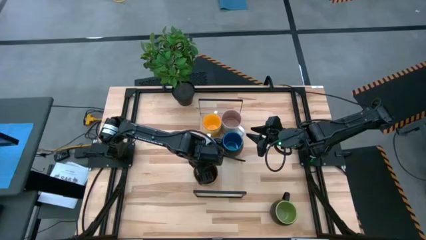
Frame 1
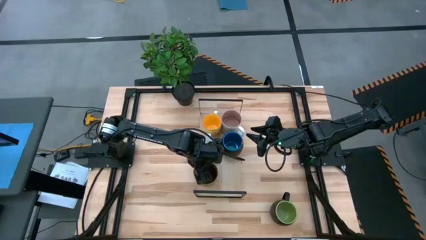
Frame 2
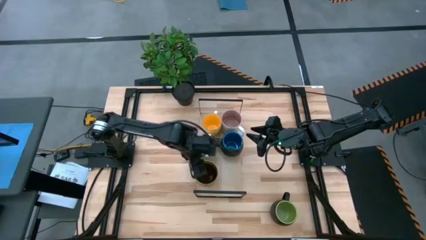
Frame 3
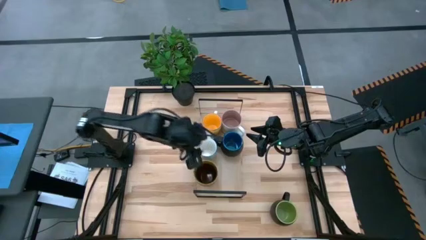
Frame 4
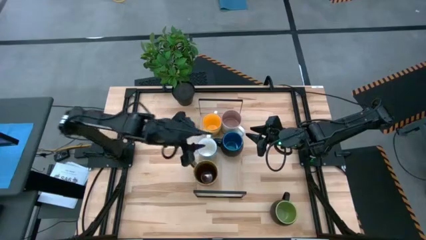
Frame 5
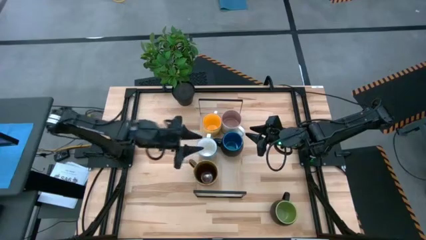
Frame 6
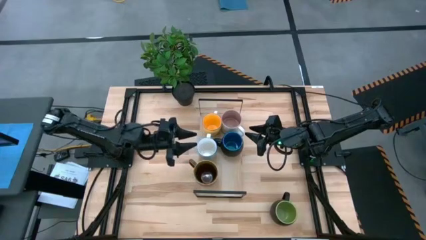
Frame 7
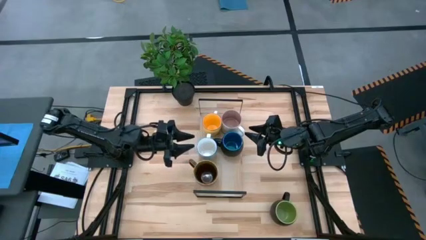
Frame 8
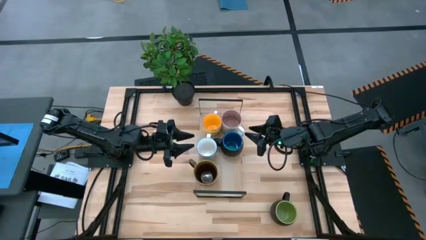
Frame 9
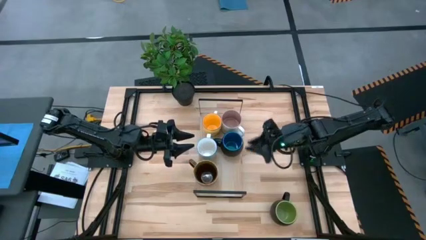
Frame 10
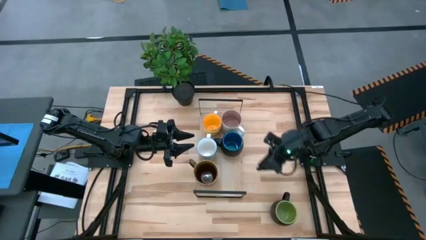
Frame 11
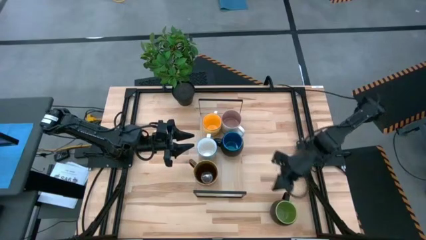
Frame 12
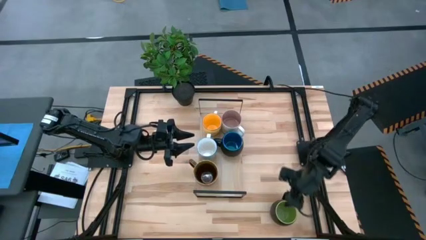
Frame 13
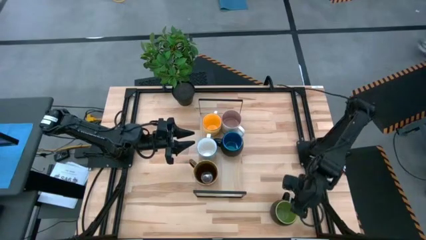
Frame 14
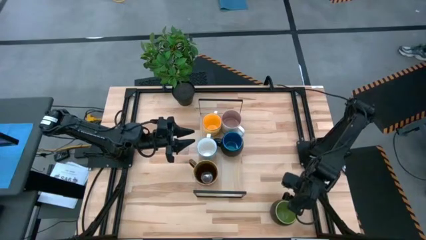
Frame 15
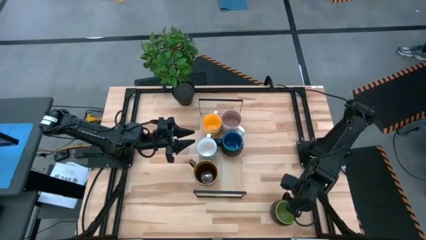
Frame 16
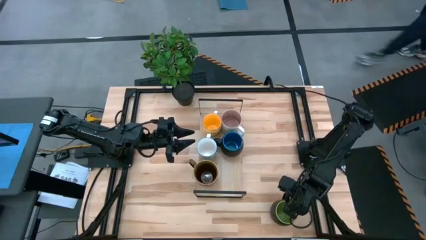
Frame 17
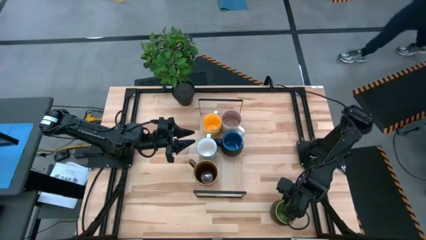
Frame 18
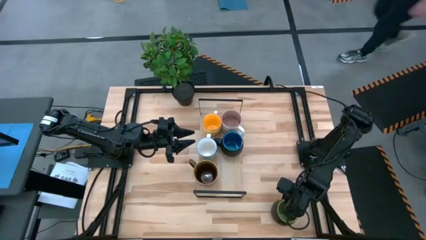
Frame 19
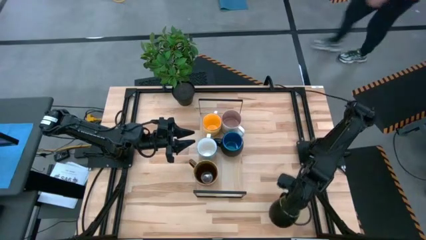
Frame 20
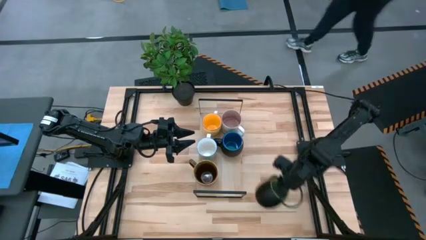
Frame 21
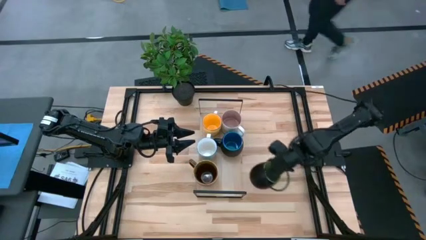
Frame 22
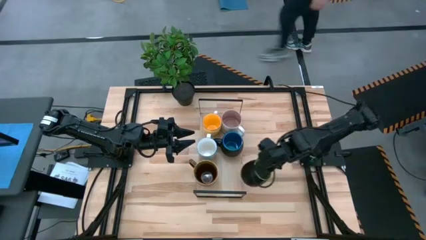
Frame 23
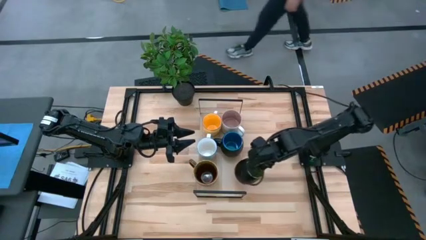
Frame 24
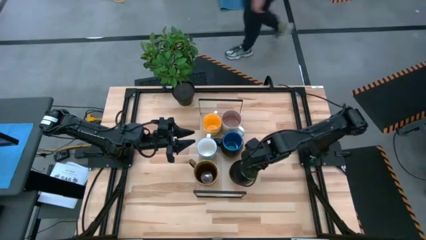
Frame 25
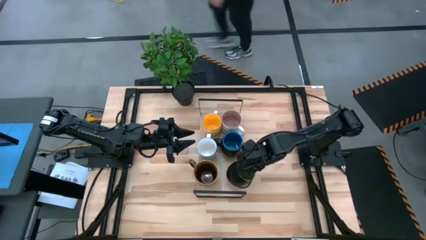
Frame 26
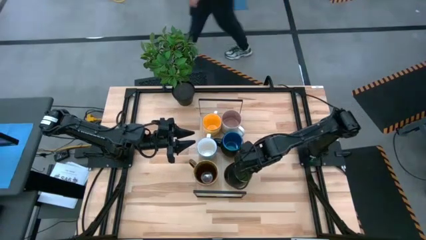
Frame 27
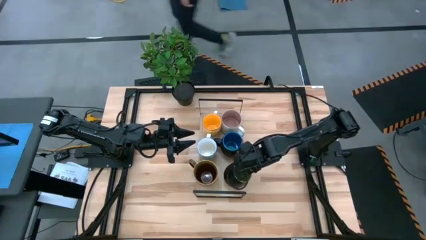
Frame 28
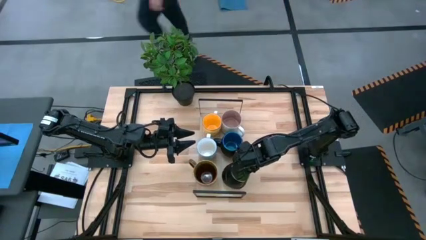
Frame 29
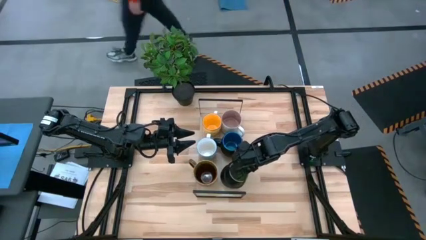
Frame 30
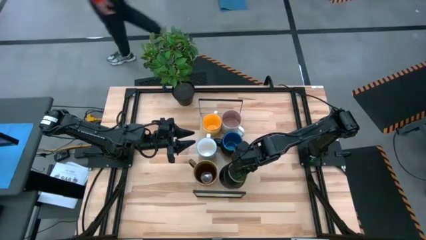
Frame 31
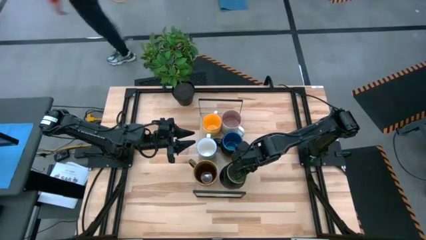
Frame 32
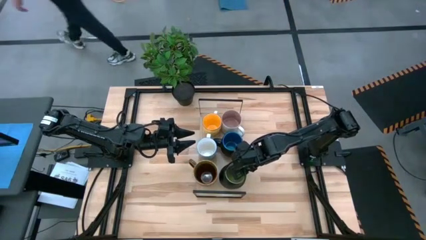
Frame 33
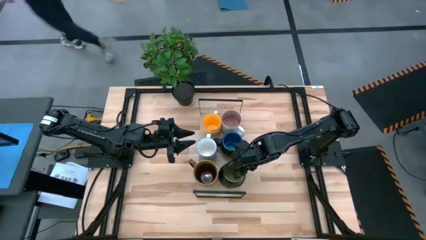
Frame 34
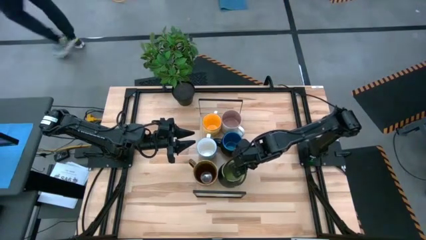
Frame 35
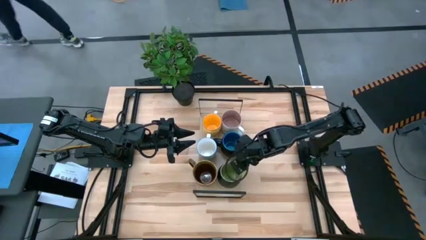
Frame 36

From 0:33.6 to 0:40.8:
Task: Place coffee mugs
Put the black green mug on the shelf

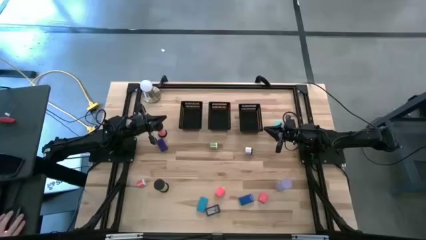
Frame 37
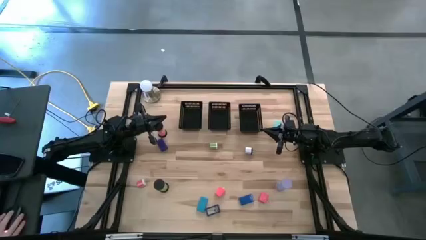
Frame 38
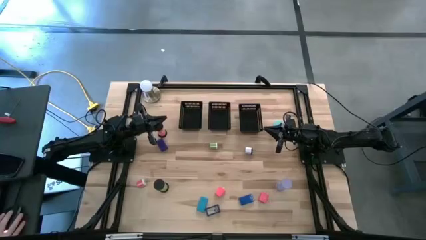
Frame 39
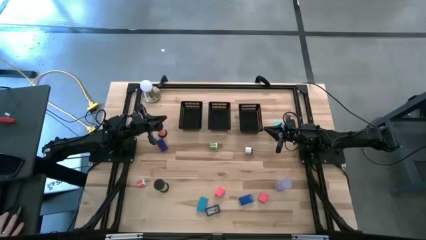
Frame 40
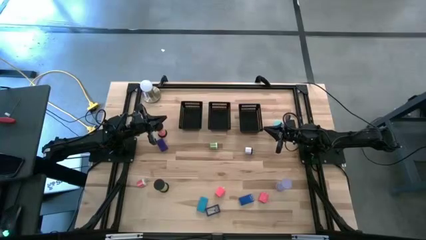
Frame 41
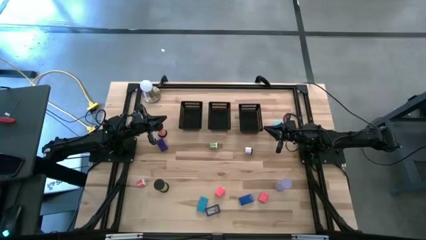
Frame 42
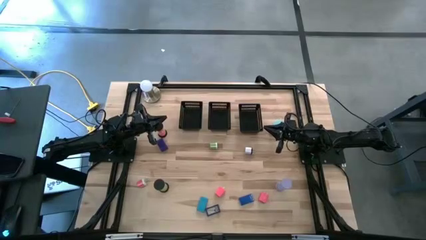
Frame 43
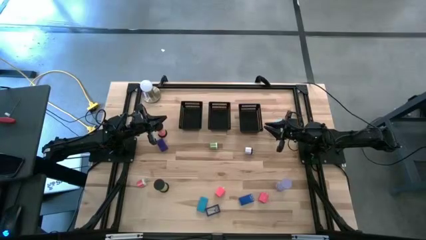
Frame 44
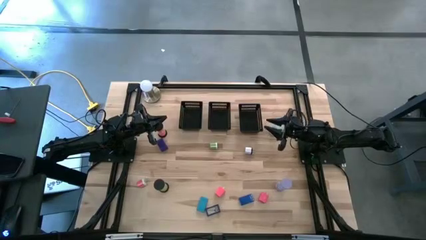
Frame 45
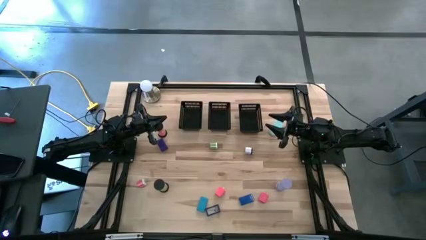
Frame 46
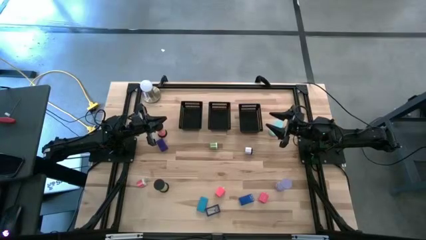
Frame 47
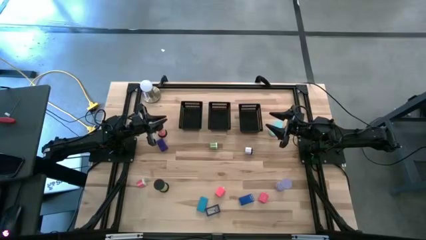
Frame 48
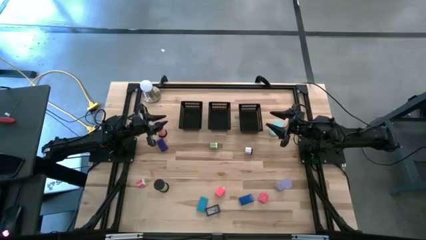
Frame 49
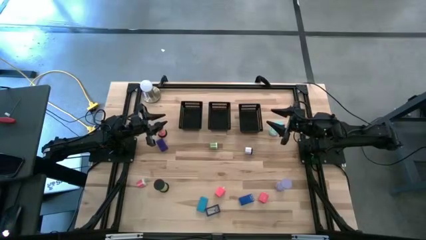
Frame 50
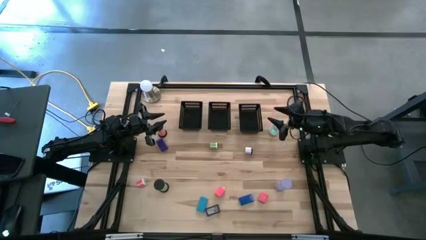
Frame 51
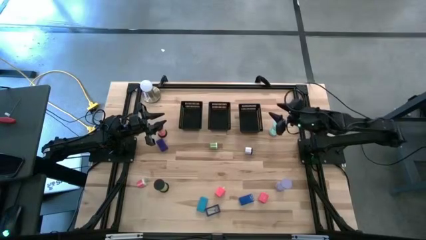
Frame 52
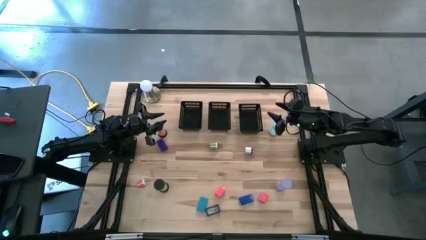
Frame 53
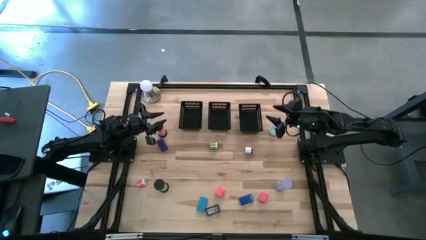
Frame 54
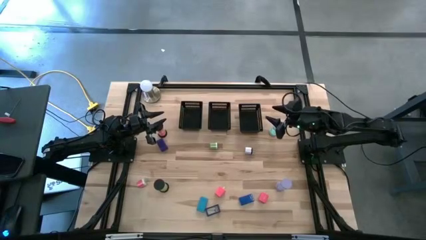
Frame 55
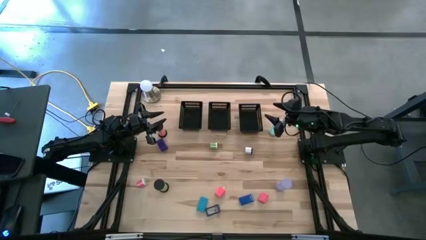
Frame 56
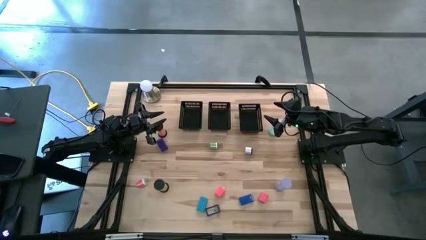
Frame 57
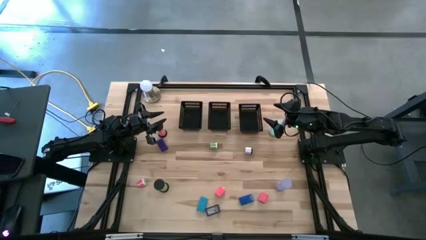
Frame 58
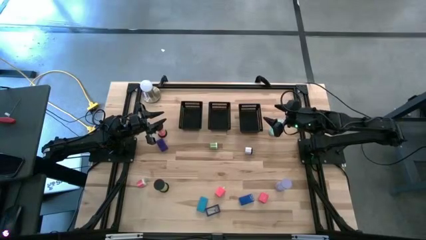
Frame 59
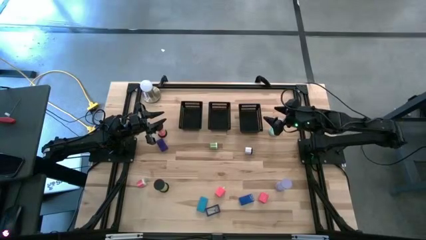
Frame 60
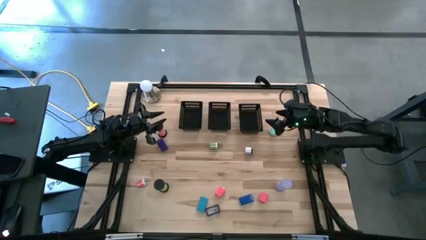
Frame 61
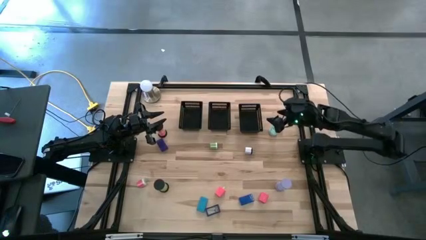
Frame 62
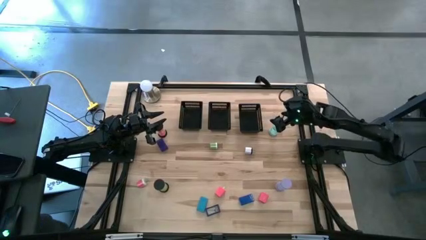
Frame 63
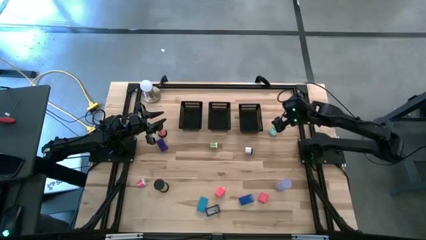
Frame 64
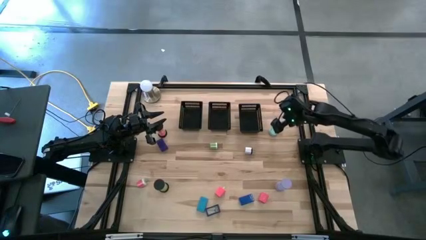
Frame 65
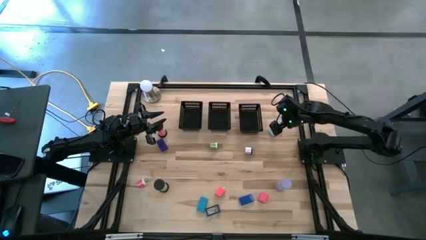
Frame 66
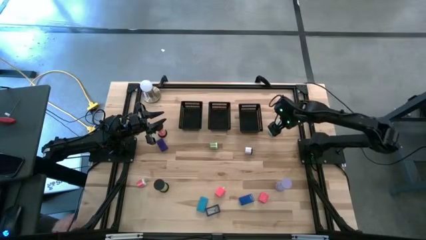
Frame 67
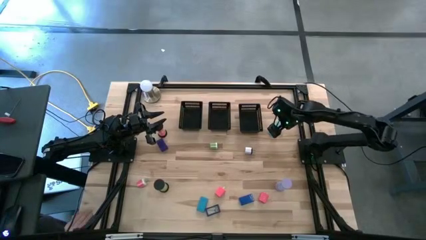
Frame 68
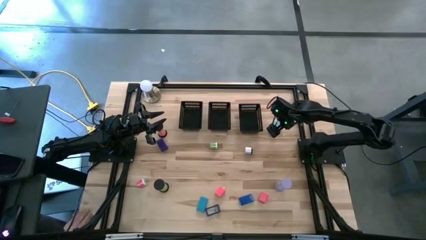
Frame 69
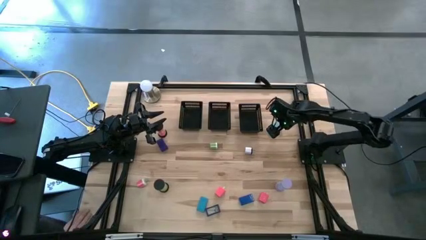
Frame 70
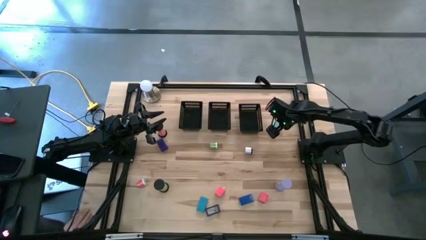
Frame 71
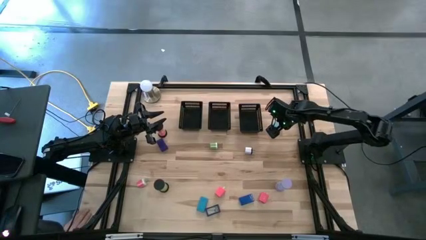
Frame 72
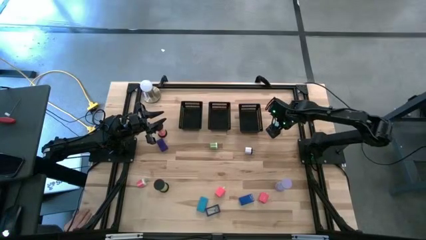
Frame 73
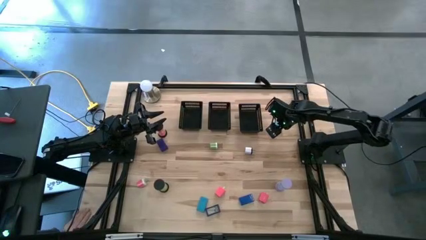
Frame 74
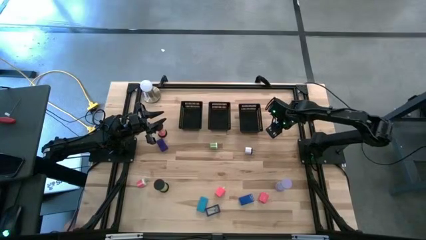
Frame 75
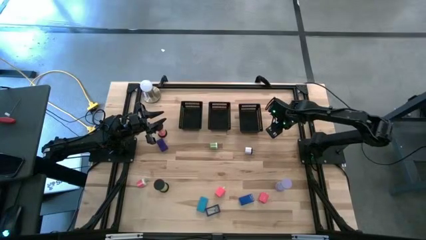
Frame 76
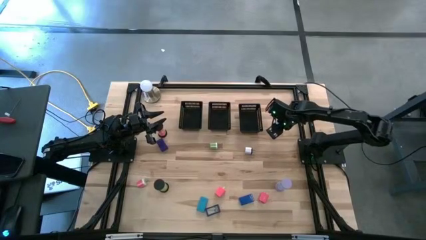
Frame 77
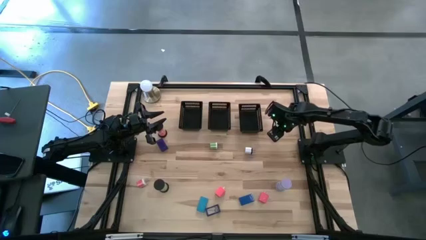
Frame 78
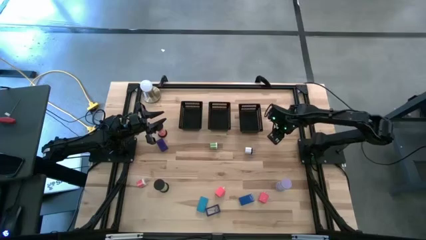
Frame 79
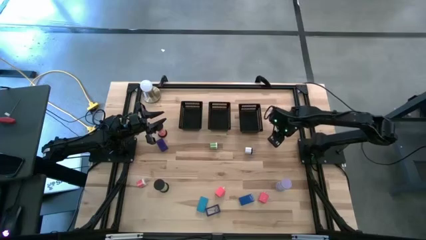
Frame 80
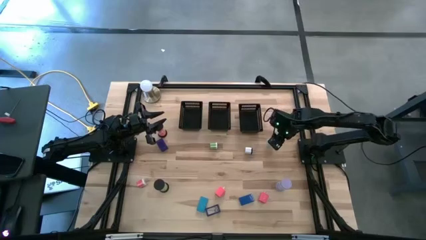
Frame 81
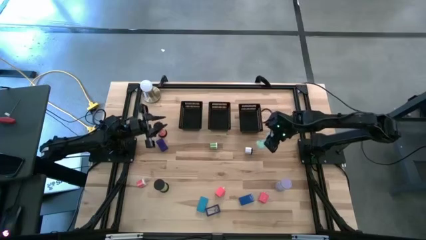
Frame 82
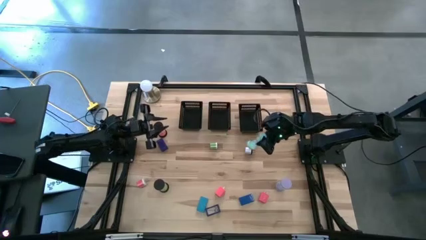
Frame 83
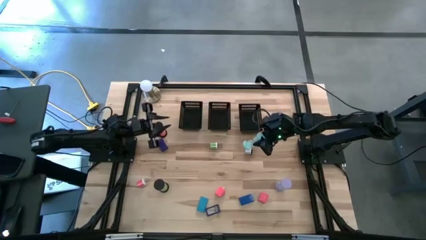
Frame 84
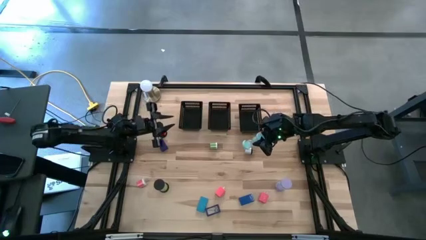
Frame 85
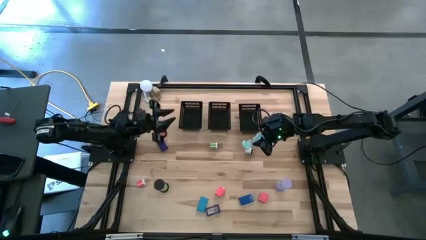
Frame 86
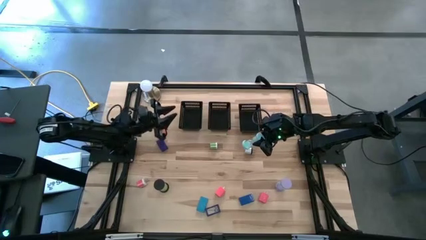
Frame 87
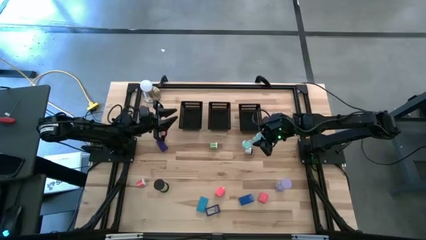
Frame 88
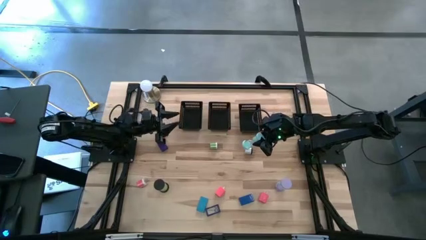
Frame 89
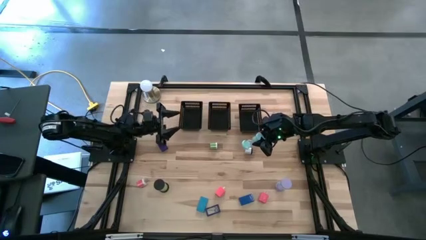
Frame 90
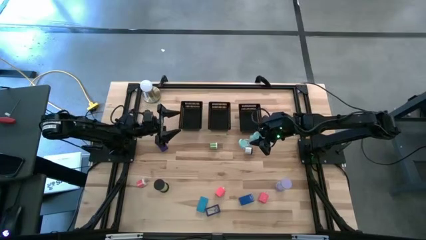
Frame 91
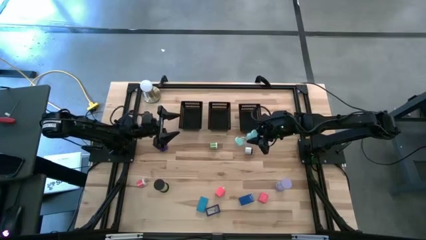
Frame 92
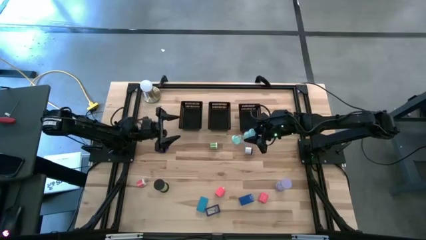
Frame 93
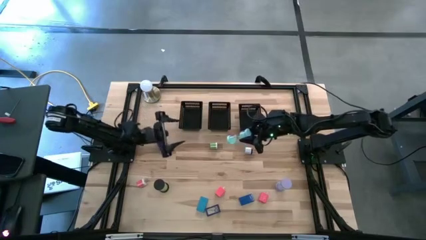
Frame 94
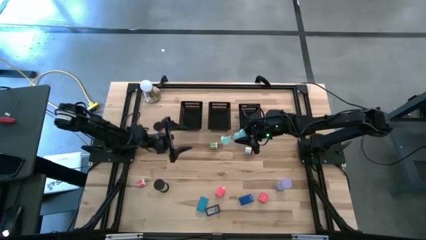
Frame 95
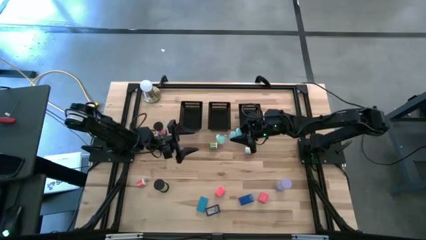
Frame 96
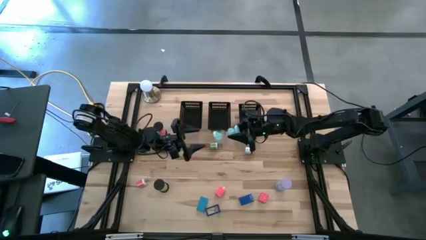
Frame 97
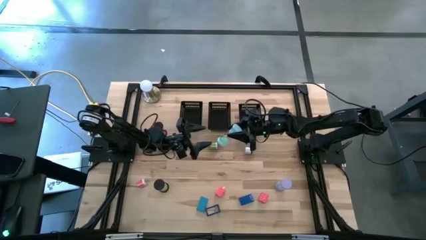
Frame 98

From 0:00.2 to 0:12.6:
Task: Pick & Place Office items
Put the blue hourglass into the middle black bin
